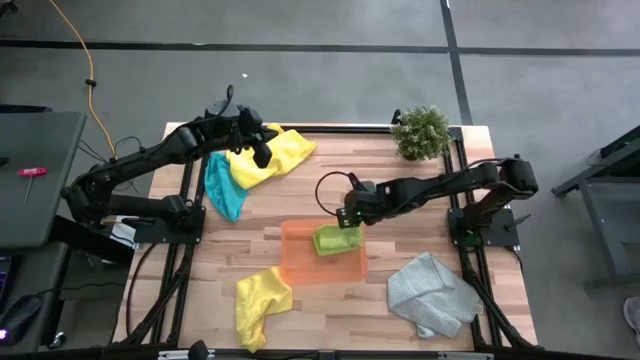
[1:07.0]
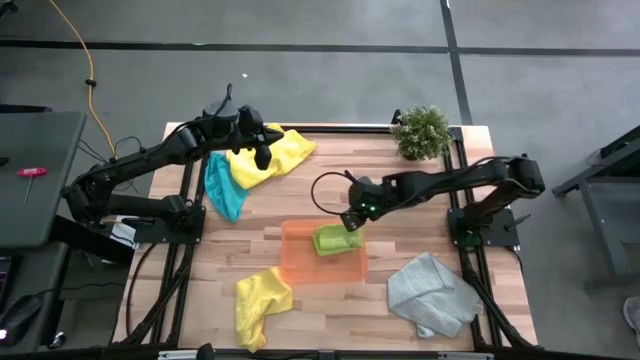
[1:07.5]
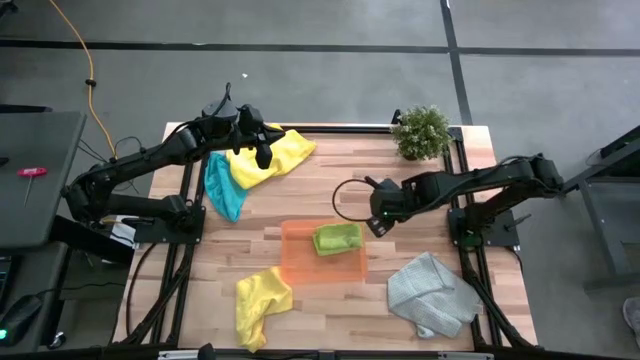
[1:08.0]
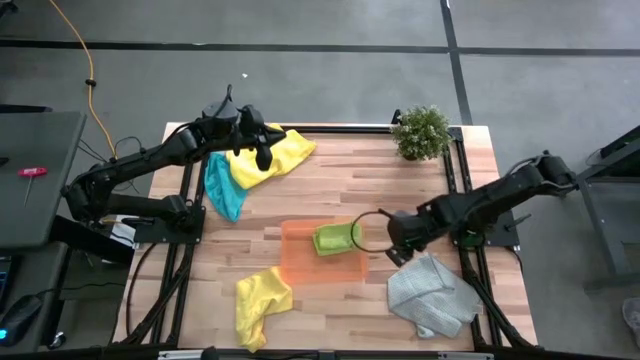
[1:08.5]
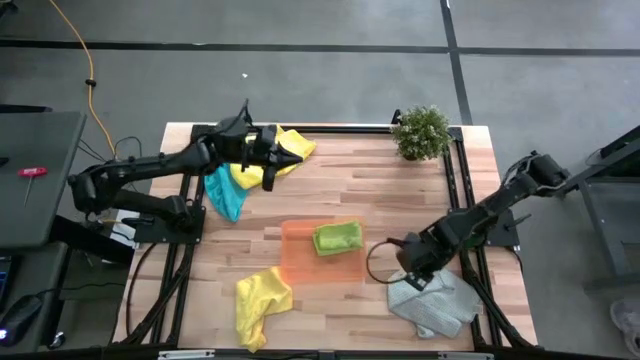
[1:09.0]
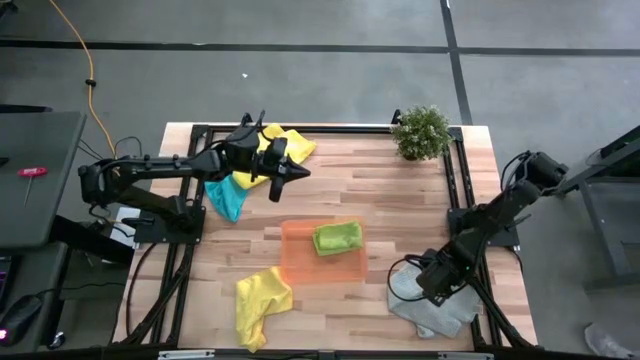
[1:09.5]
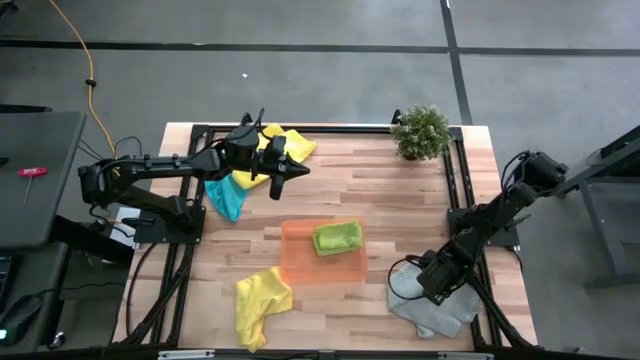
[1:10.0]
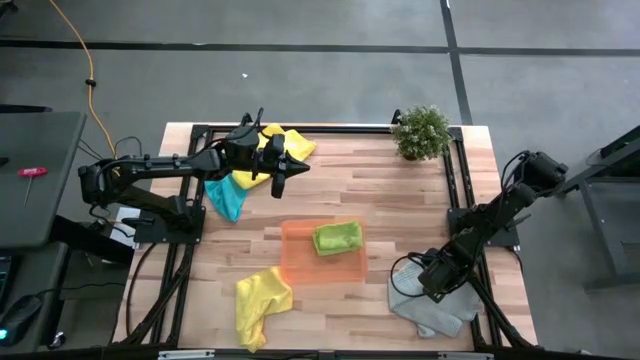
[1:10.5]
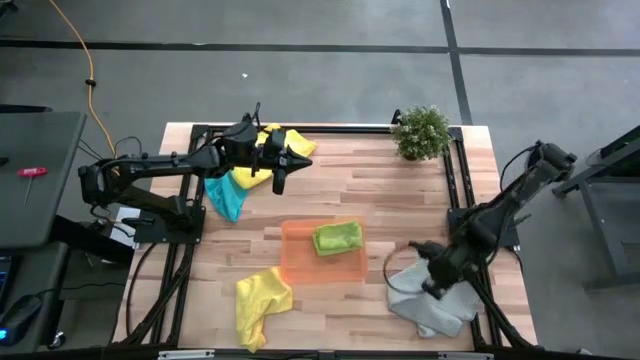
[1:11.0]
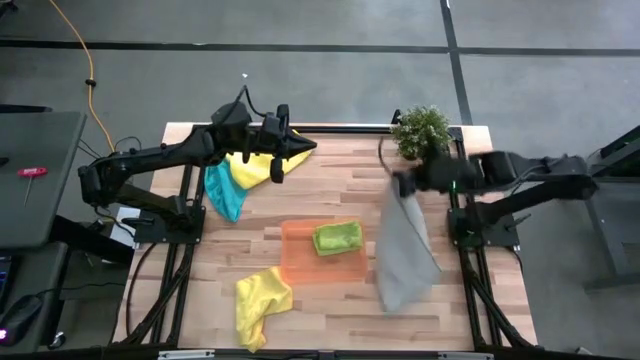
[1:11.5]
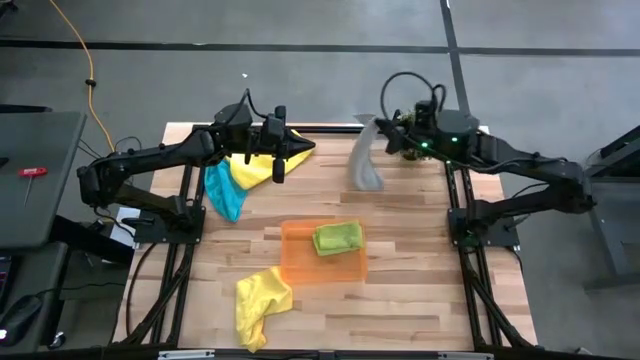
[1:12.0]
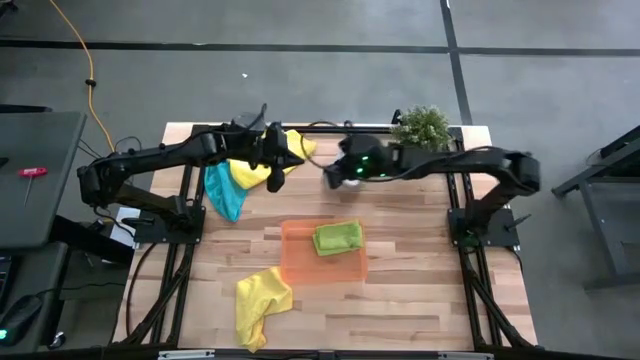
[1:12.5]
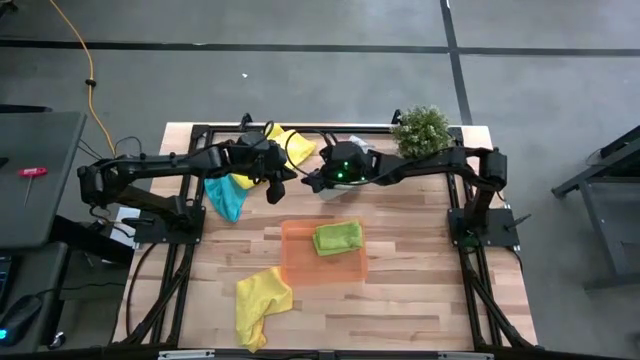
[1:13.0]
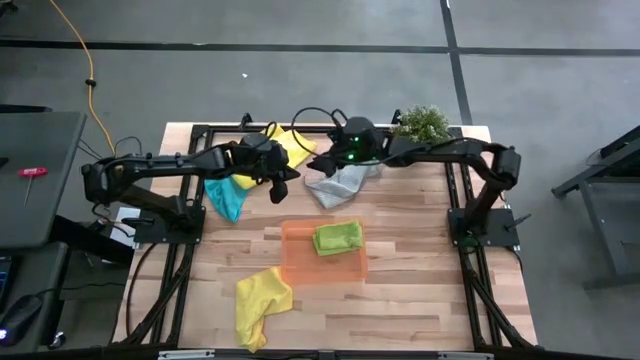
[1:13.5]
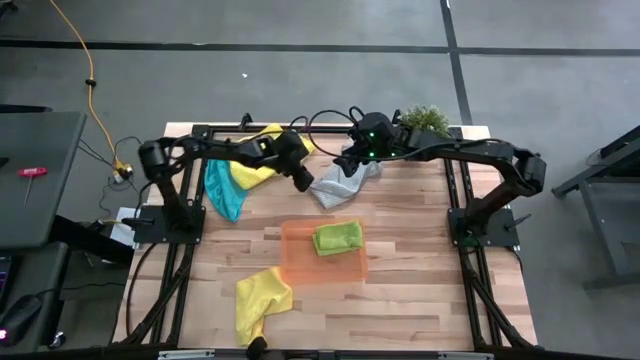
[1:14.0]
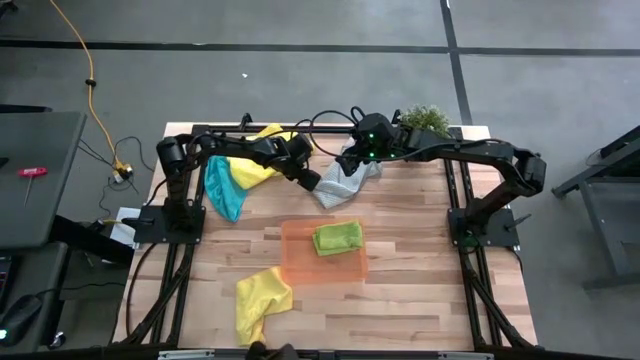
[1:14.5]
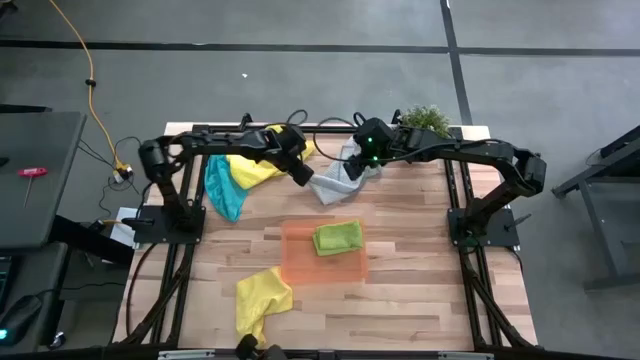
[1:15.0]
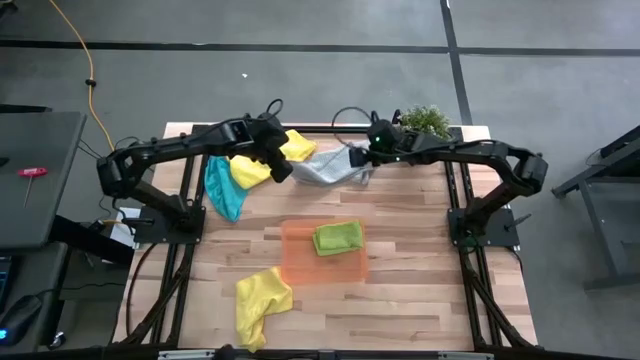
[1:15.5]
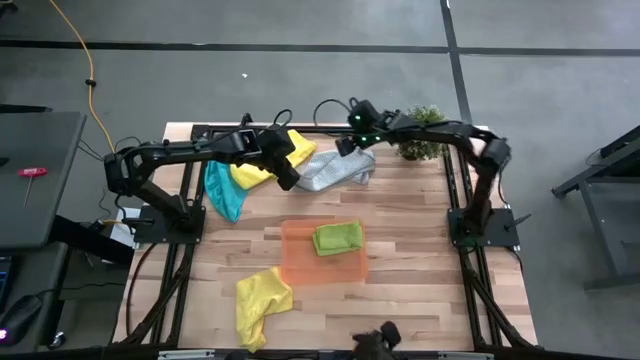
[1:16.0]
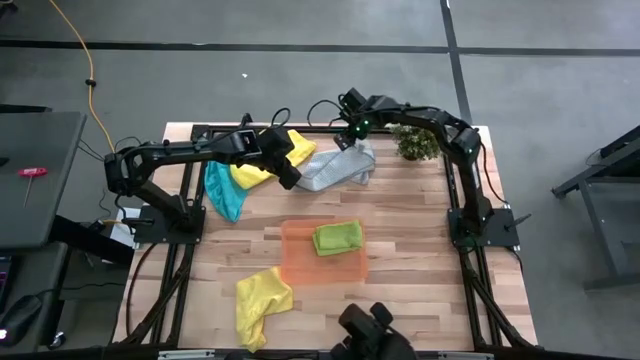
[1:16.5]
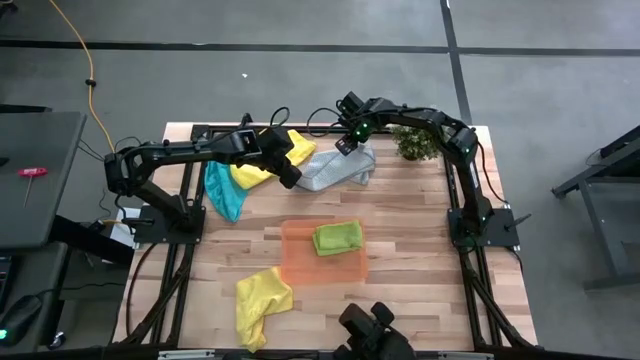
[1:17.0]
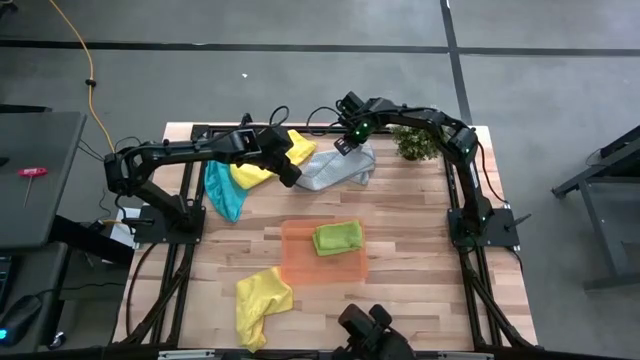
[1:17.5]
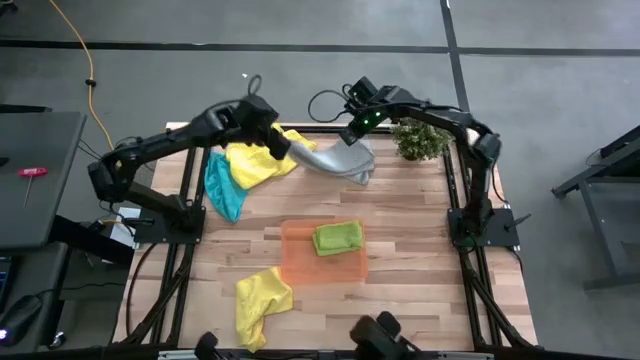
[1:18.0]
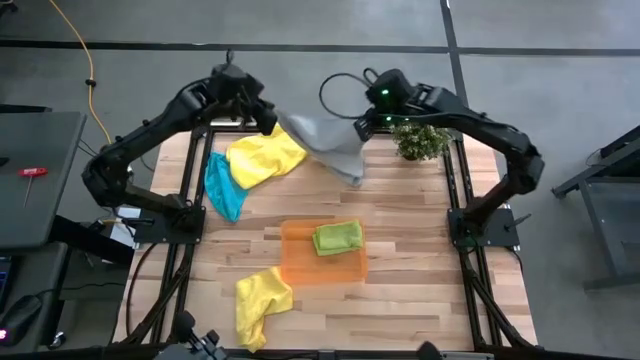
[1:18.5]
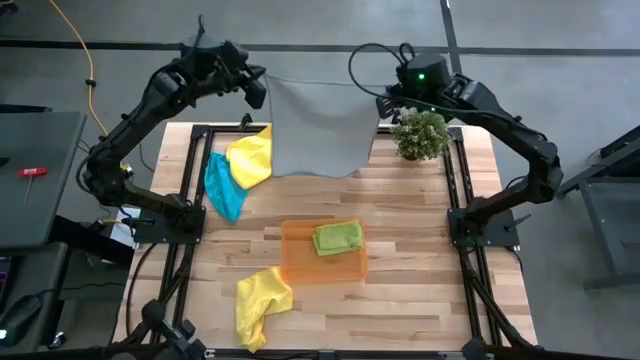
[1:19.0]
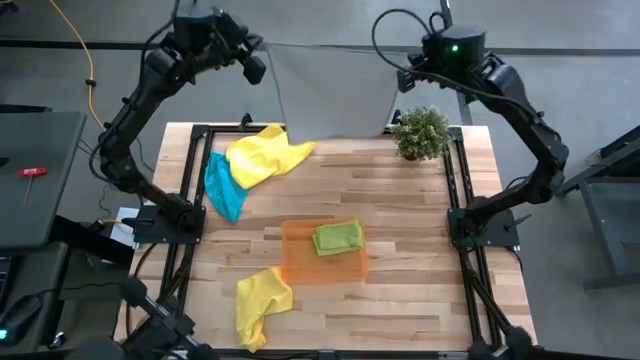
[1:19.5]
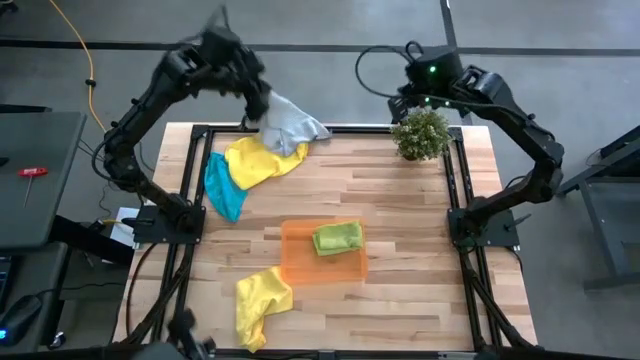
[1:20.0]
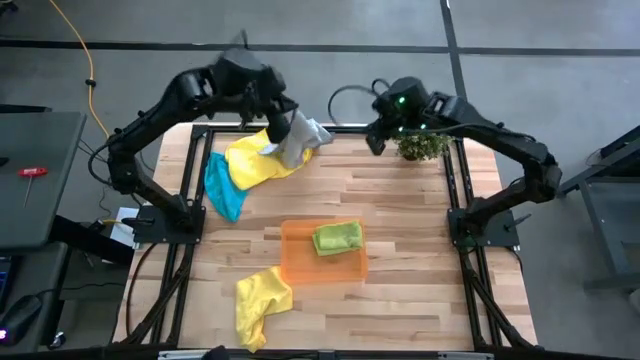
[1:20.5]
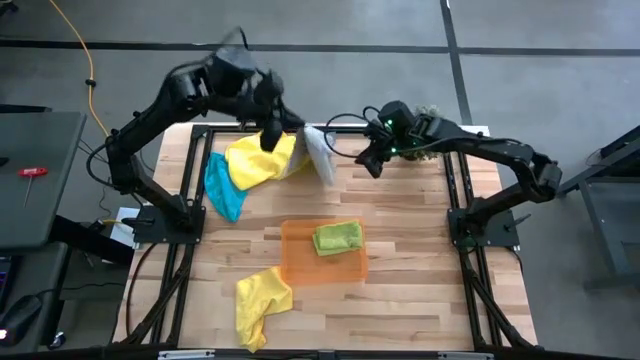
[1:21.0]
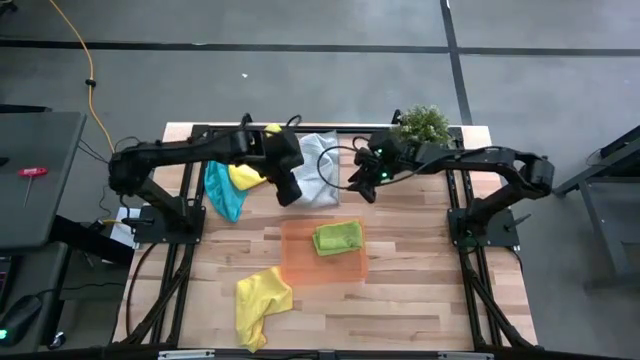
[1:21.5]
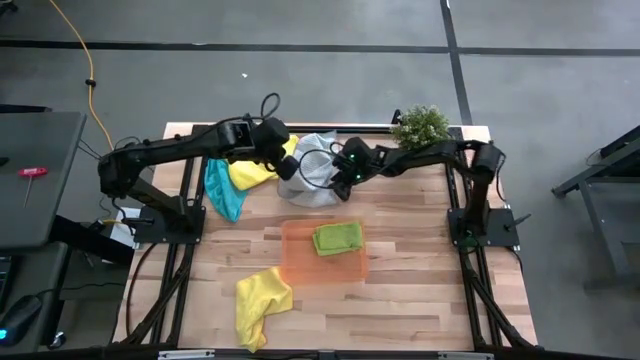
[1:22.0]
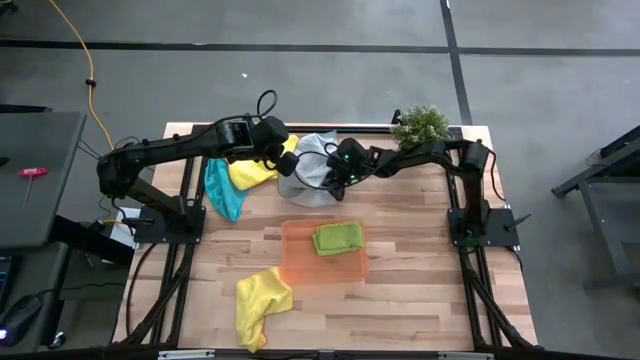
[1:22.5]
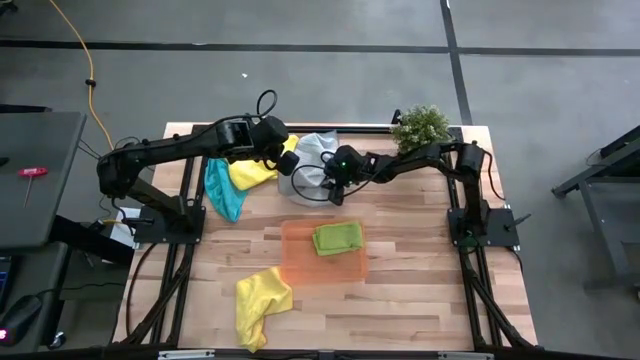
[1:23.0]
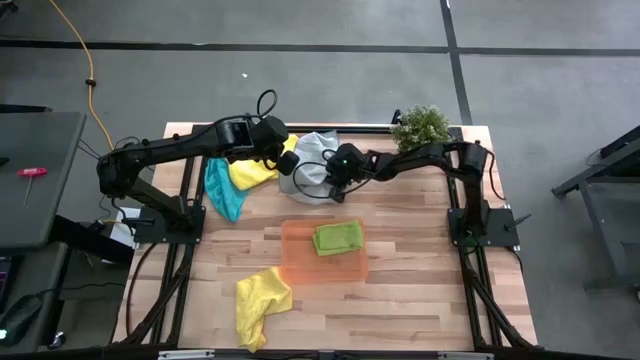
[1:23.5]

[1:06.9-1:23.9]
Task: Fold microfiber towels
Fold the gray towel
